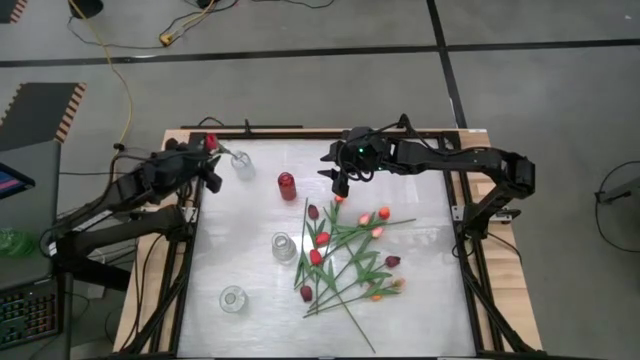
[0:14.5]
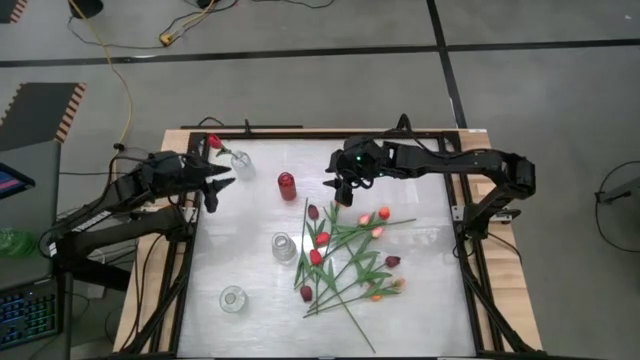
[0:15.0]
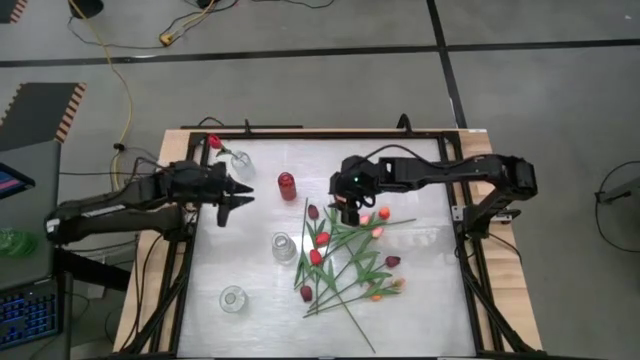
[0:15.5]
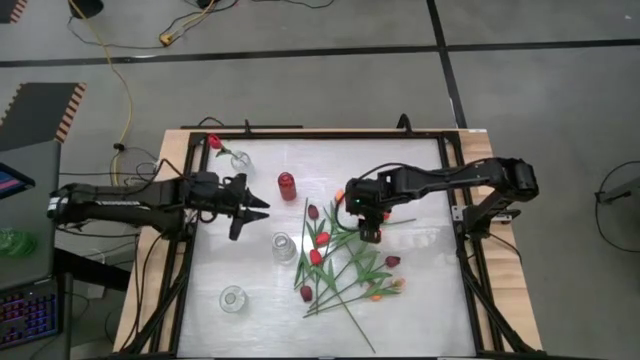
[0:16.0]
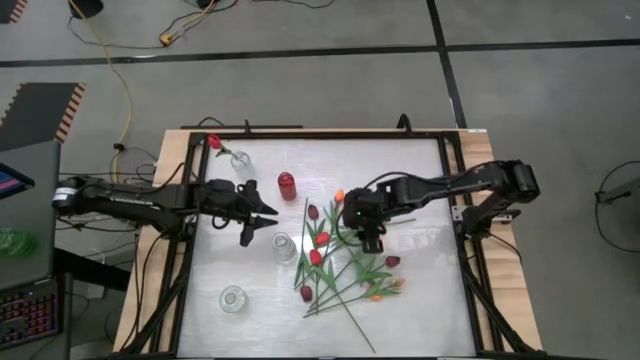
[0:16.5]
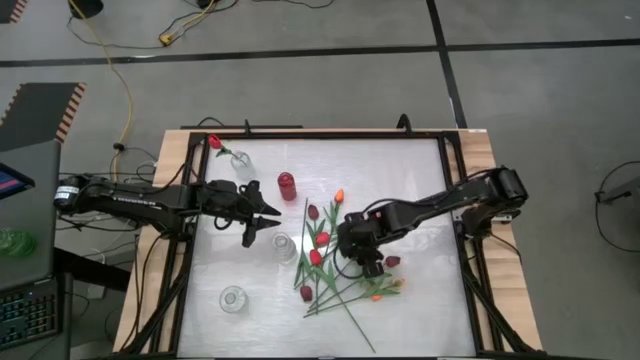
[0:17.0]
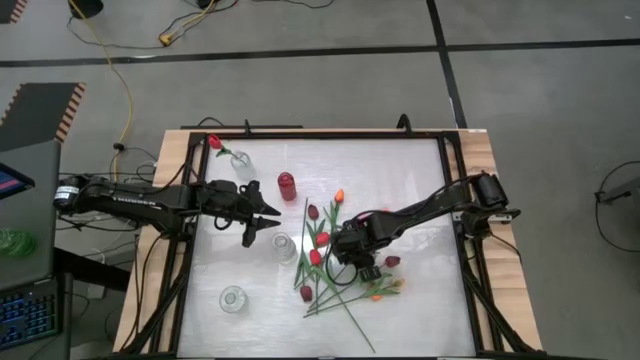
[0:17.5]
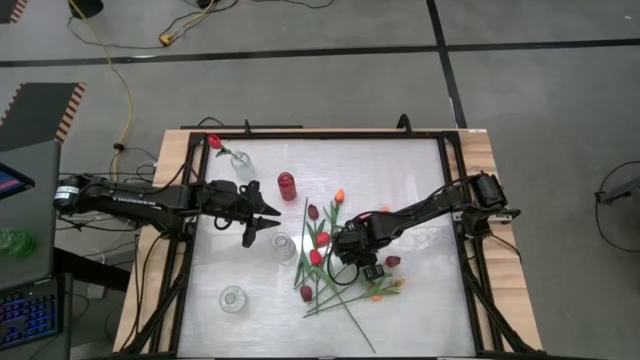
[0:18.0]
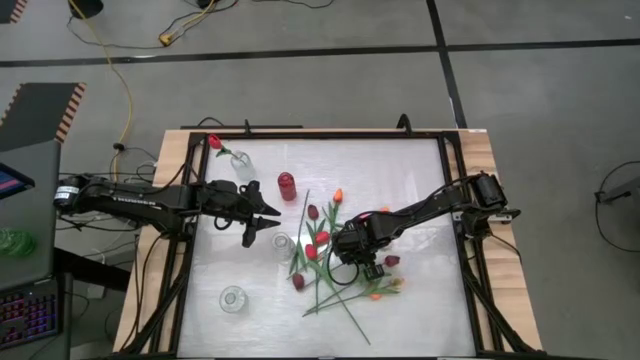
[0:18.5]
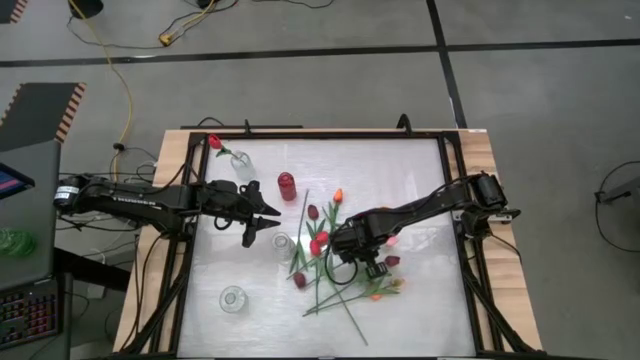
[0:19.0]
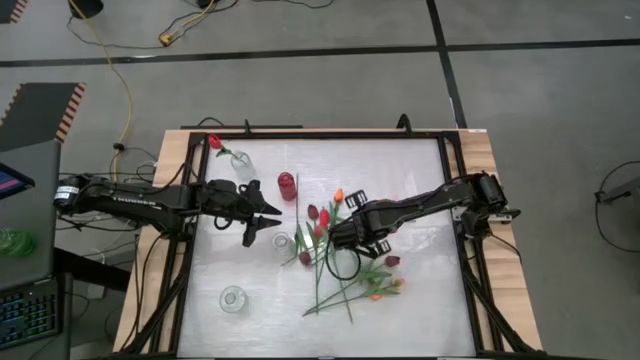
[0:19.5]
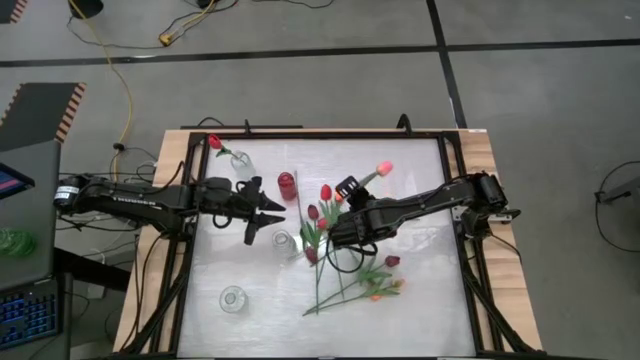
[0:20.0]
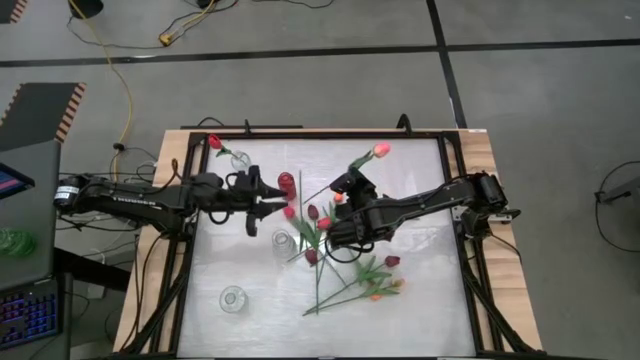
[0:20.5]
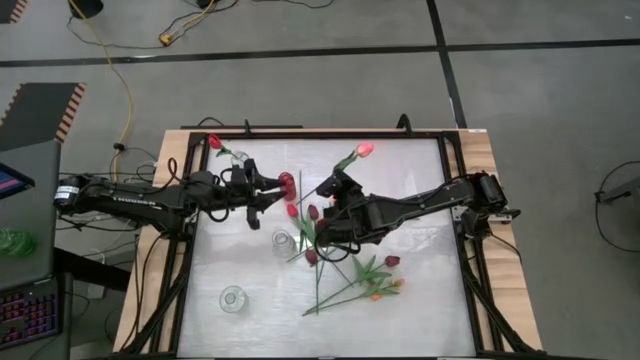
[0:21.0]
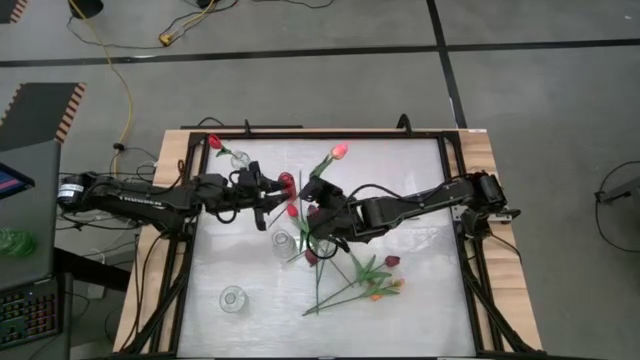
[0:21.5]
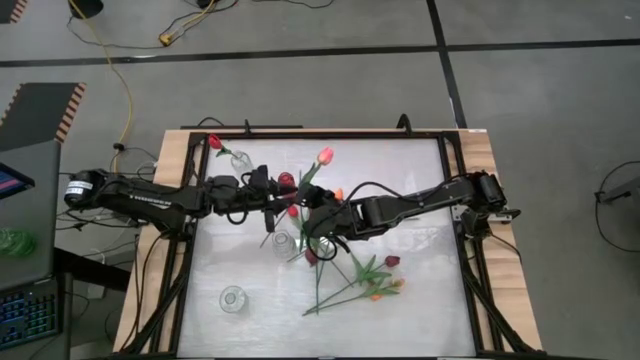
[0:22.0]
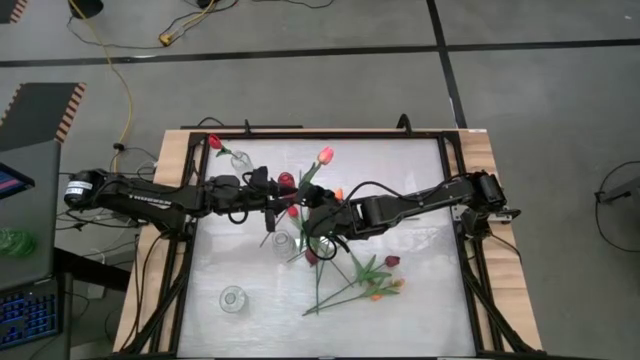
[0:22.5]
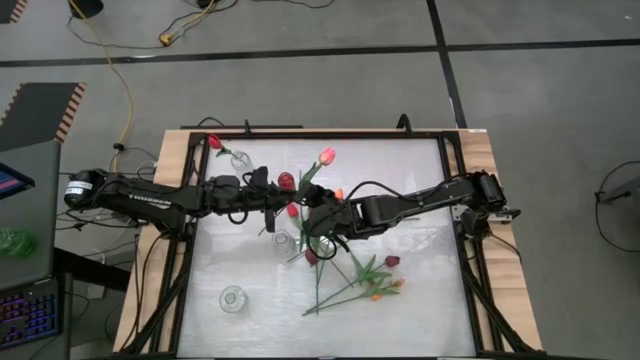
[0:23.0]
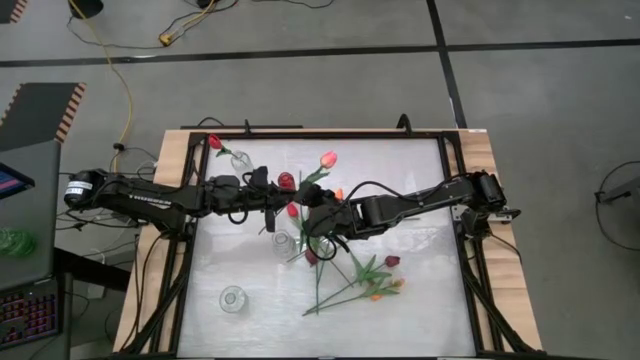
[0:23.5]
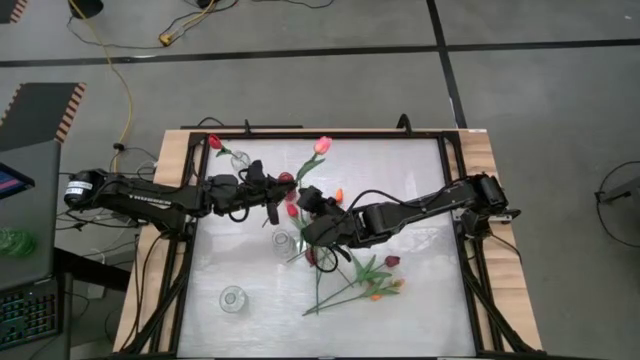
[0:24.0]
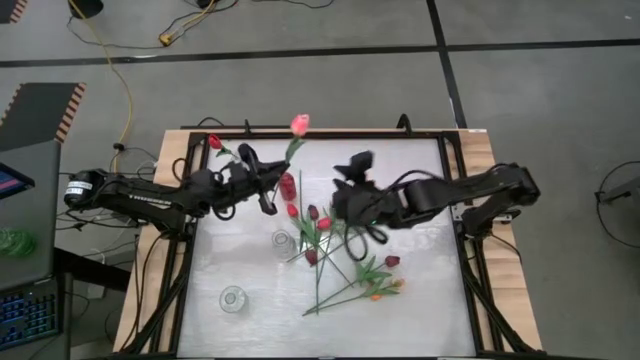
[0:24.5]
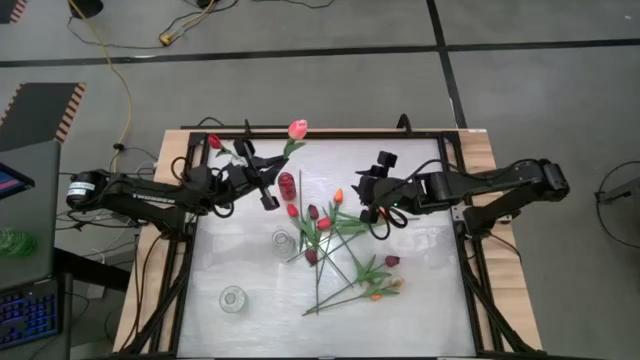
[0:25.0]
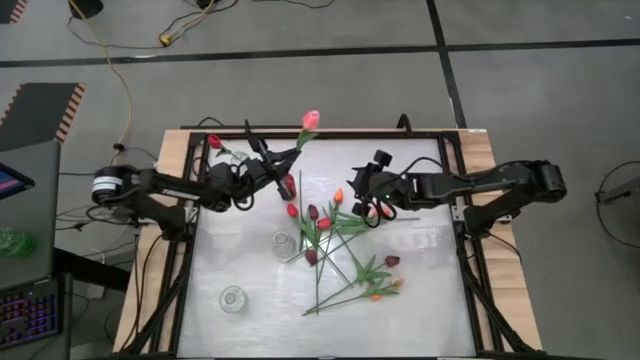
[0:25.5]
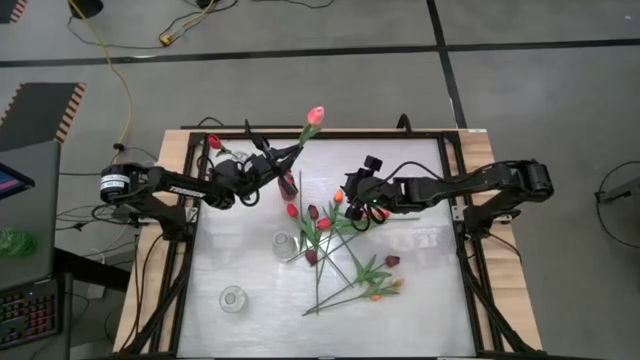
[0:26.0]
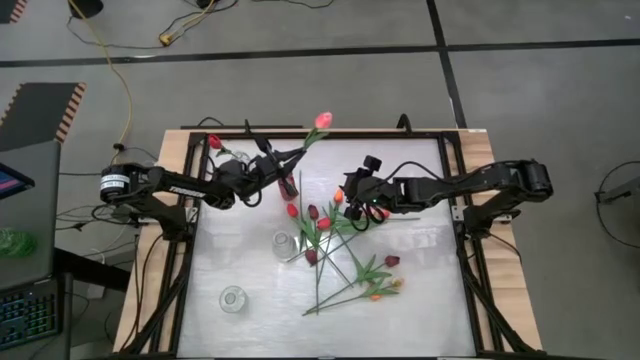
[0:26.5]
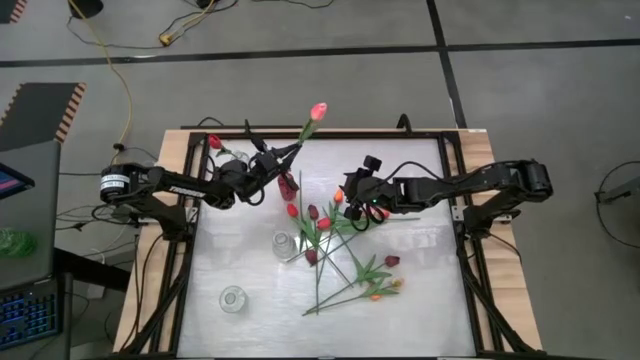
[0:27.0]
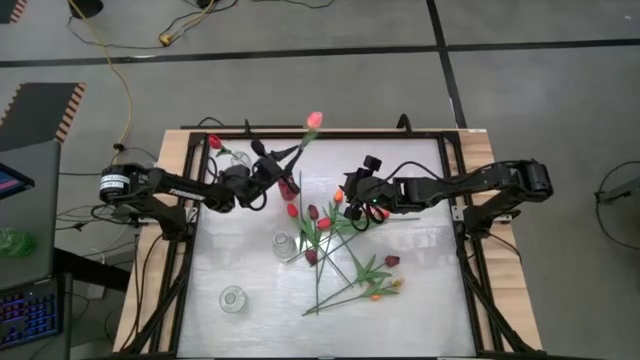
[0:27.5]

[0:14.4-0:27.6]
Task: Sort flowers into vase by color
Put the pink tulip into the red vase

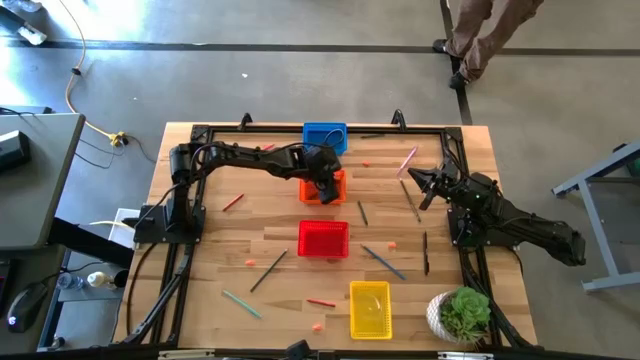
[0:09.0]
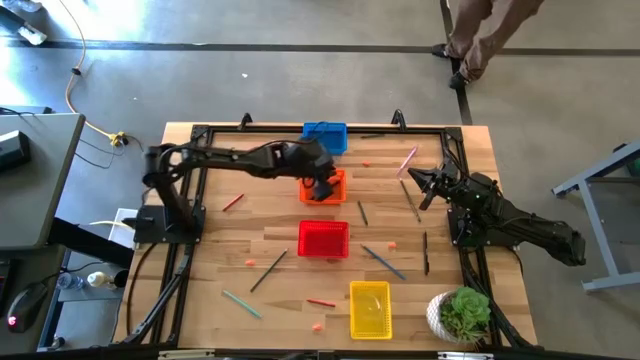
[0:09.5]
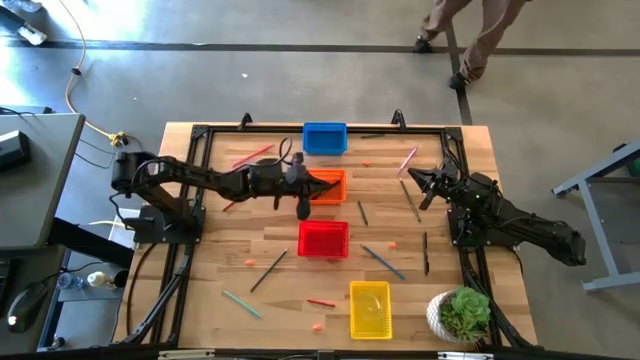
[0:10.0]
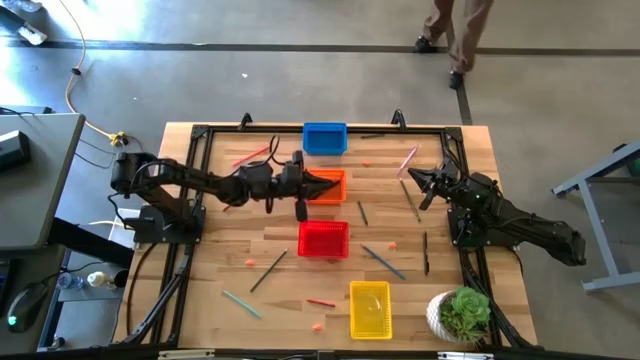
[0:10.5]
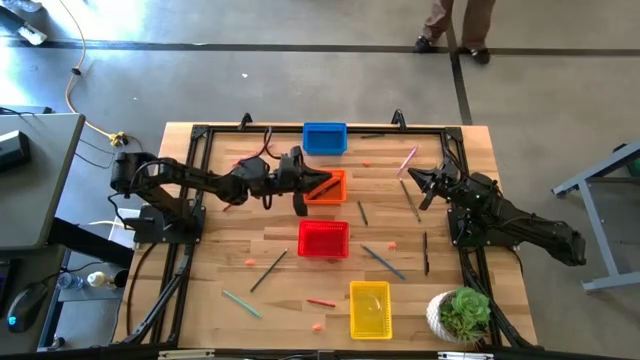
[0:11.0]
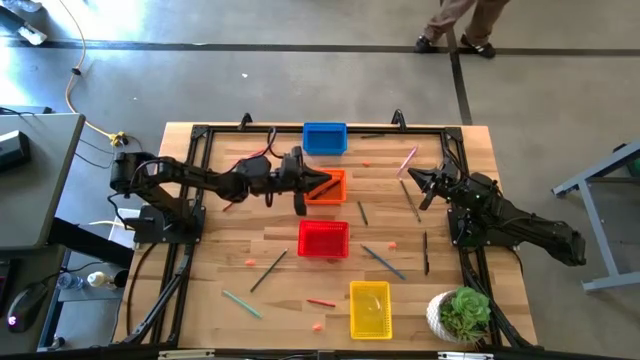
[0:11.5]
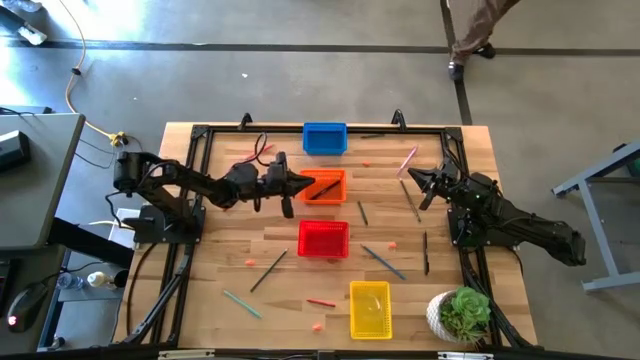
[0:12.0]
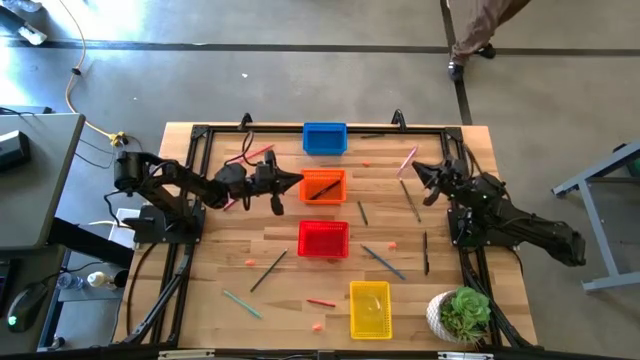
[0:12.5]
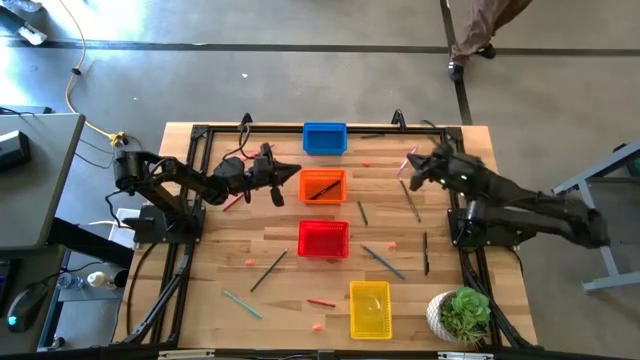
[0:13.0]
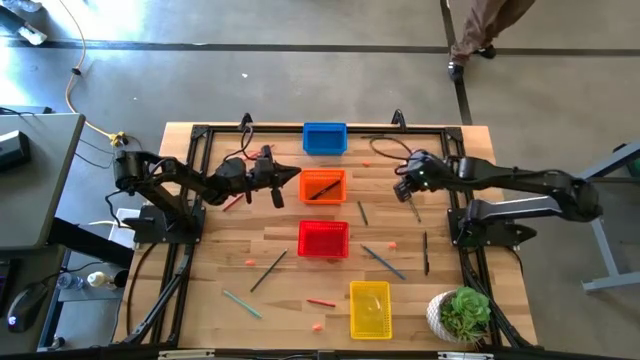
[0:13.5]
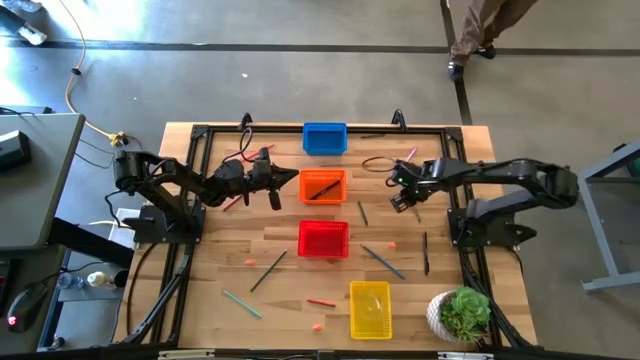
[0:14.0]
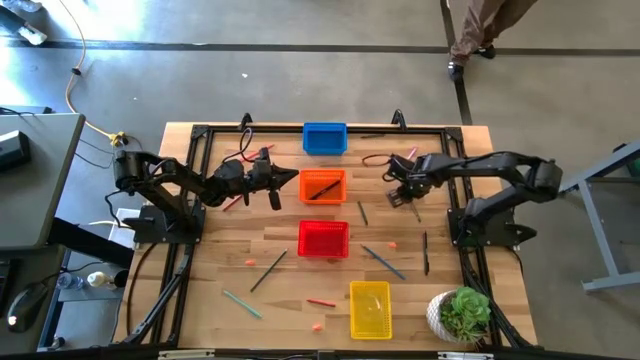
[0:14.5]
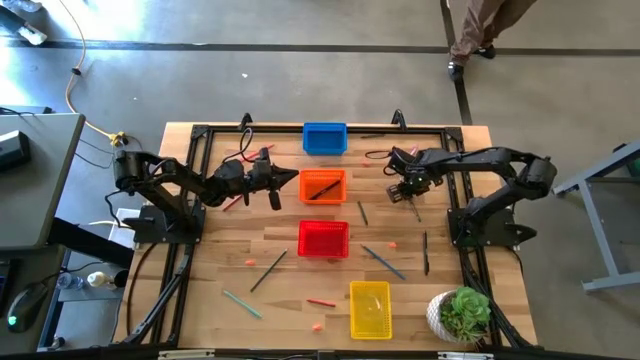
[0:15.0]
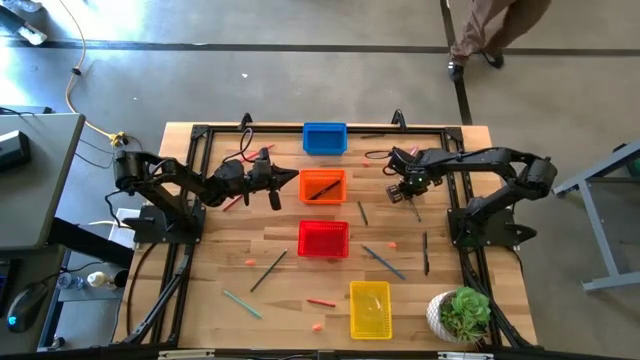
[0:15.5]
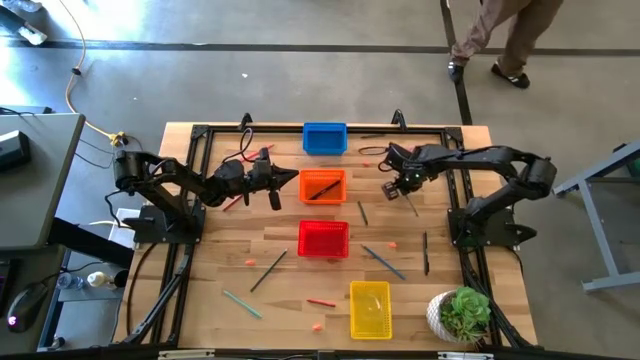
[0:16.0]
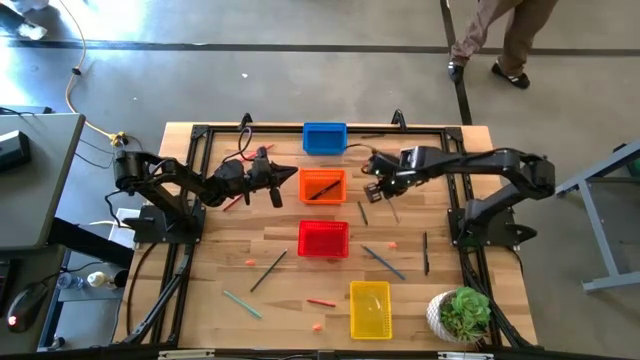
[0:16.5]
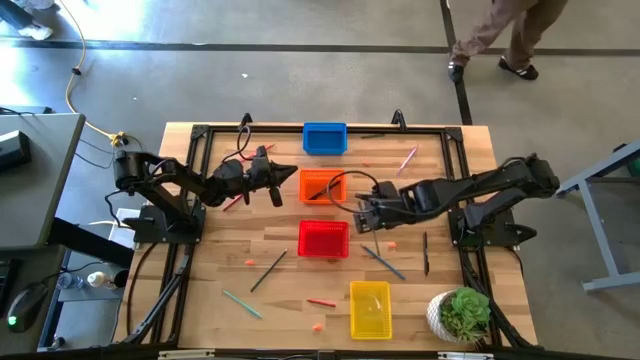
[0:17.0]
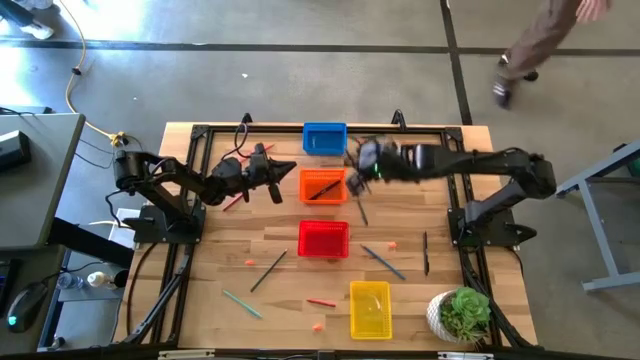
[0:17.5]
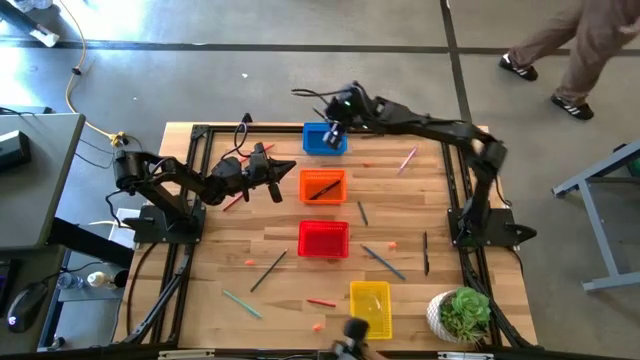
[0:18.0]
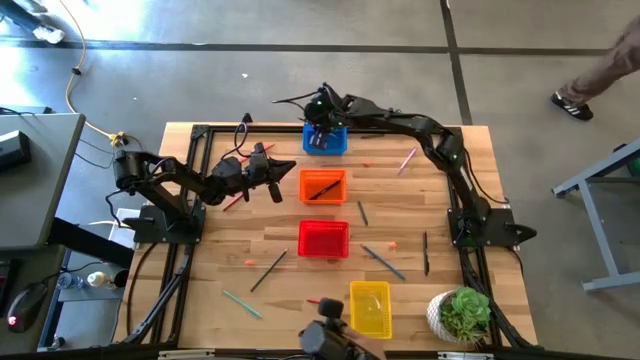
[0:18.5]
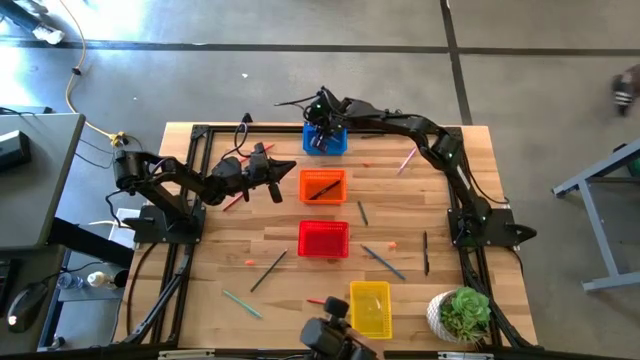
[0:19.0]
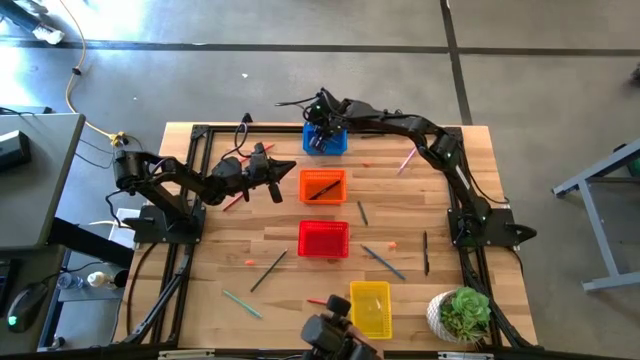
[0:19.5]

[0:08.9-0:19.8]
Task: Sort crayons/erasers/pens/pencils in bins
Put the black pencil into the blue bin
